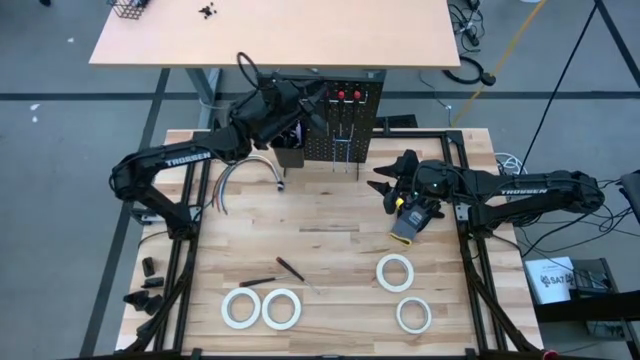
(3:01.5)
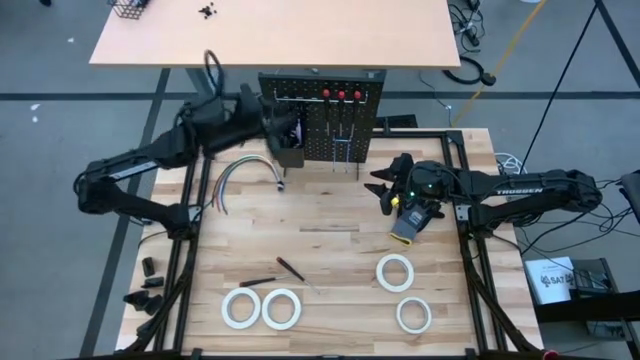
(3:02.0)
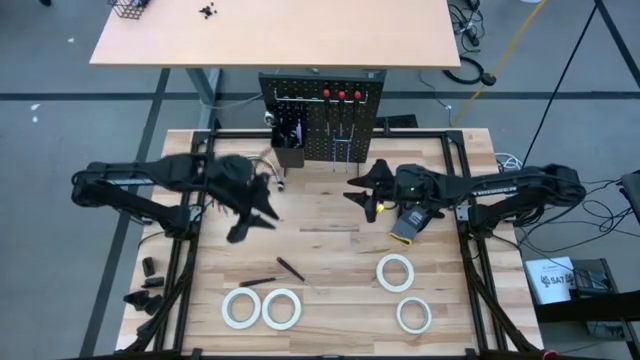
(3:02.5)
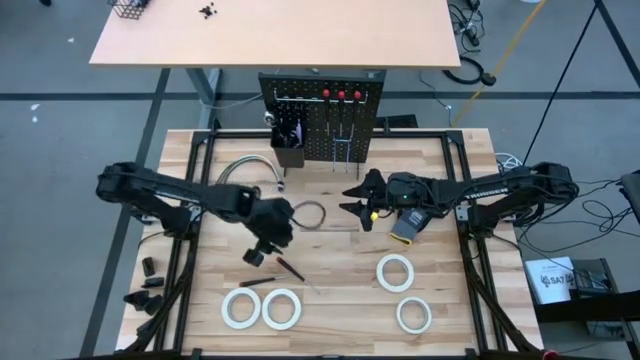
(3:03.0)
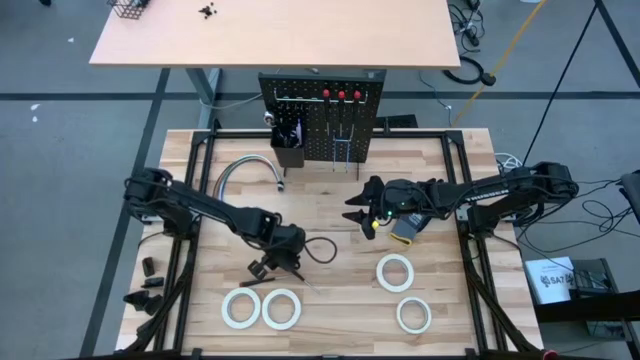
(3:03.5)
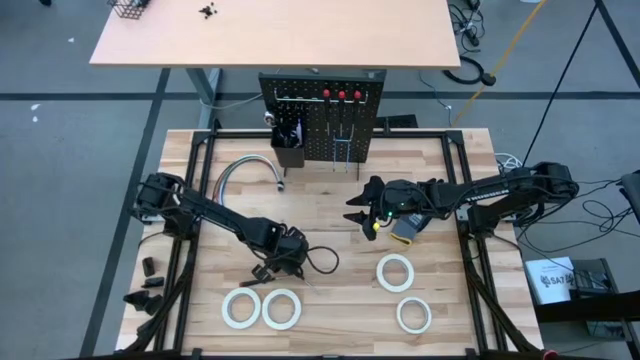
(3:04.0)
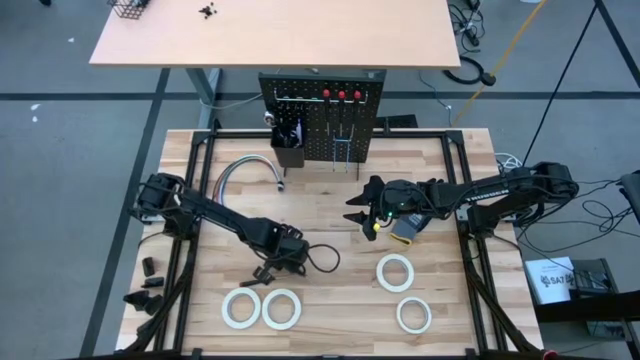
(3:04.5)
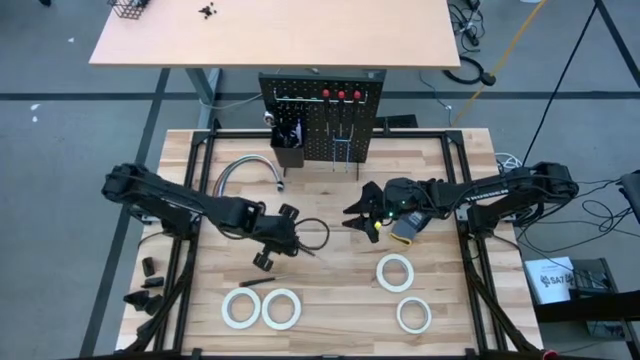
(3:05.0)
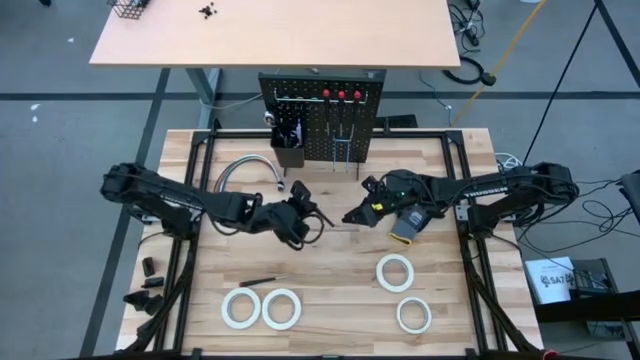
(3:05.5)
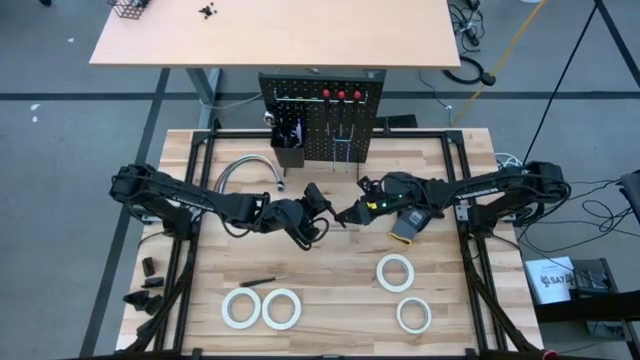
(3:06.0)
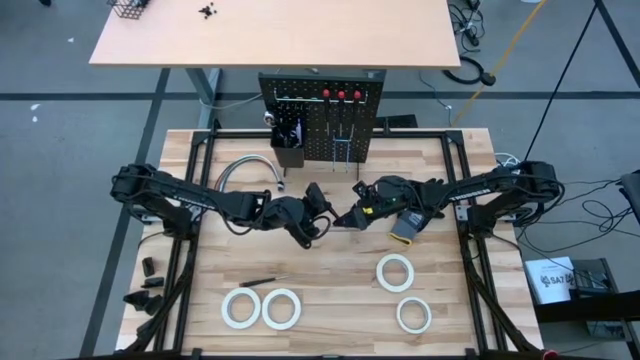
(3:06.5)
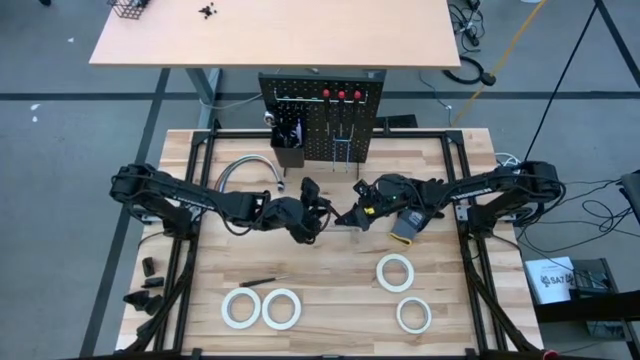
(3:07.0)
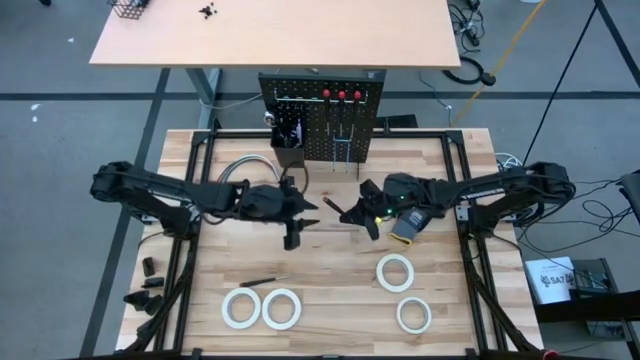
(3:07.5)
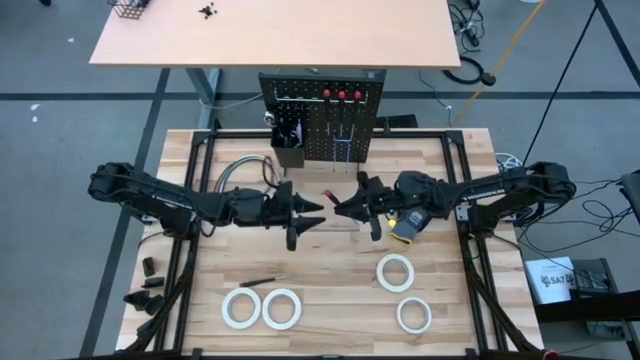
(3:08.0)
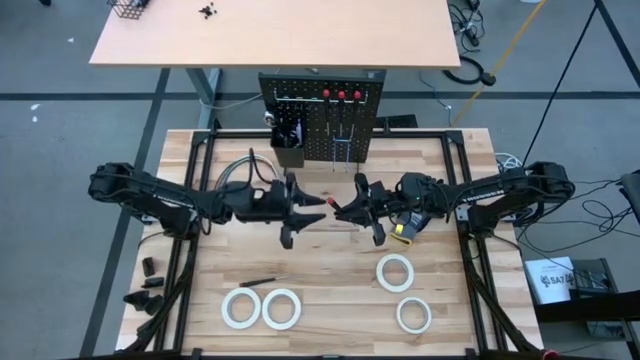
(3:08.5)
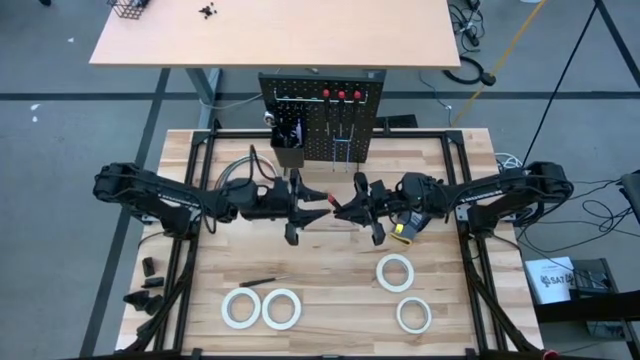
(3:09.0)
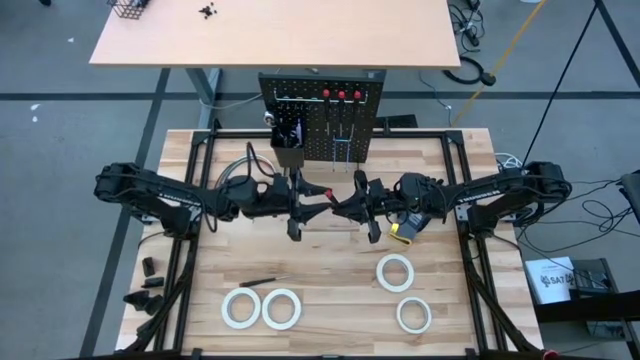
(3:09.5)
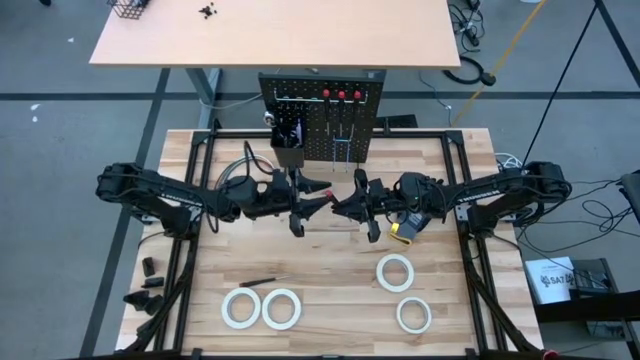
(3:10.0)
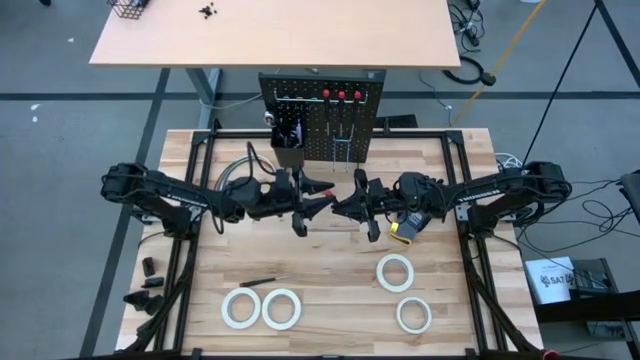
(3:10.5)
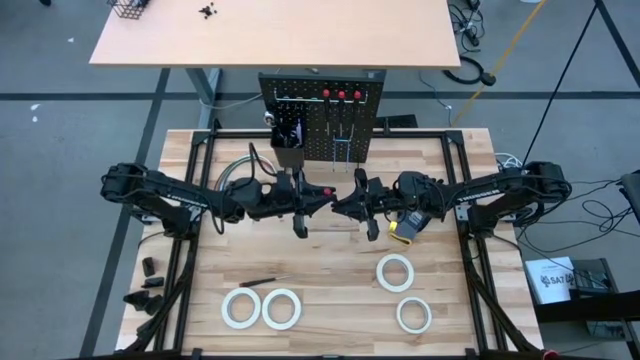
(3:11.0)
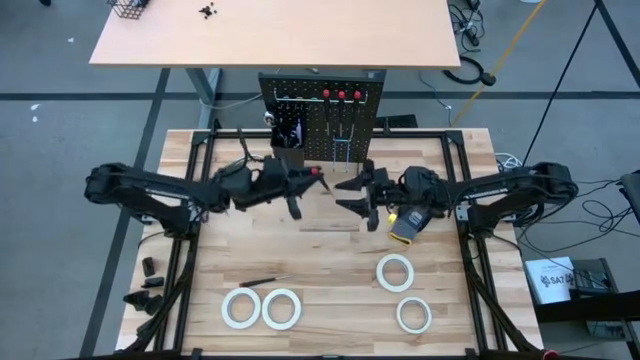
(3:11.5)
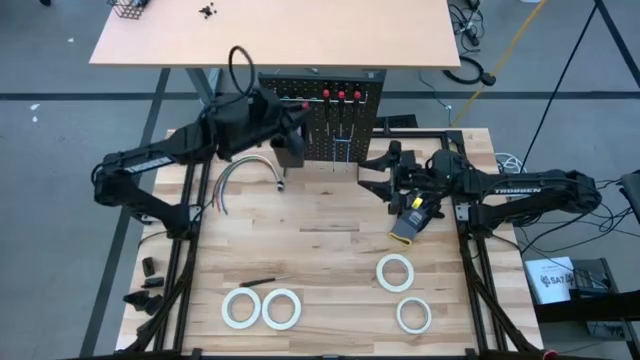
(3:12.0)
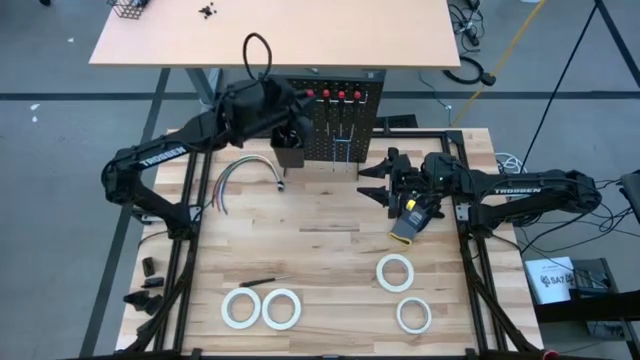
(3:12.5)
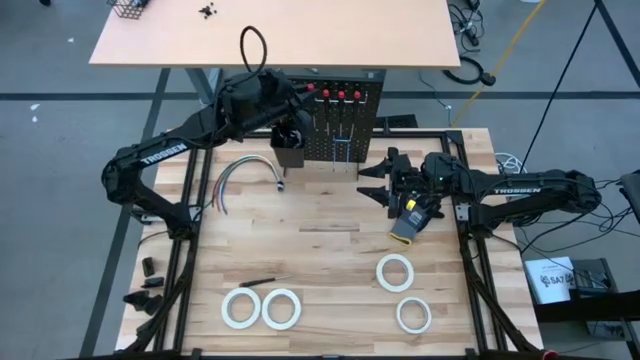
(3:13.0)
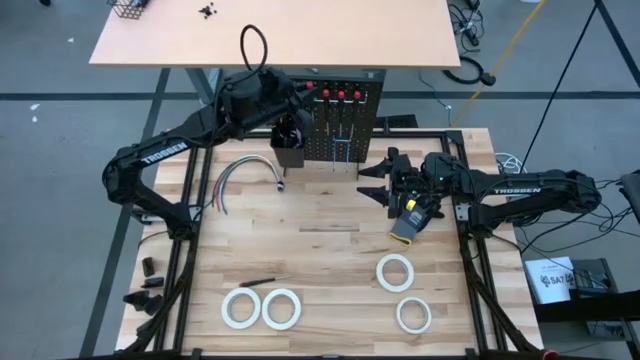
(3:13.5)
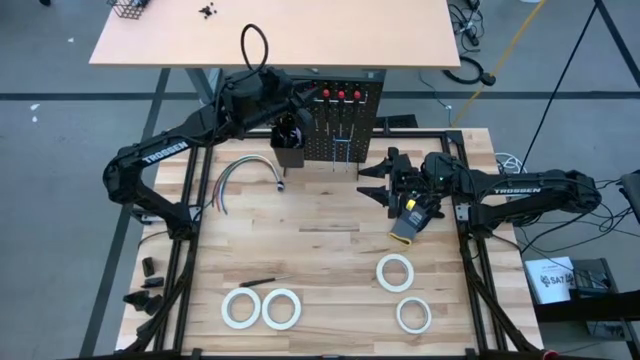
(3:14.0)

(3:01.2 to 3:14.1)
Task: Hang tools onto peg board
Hang the nut driver on the peg board

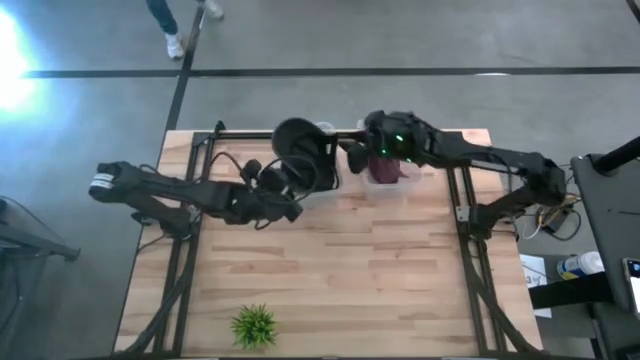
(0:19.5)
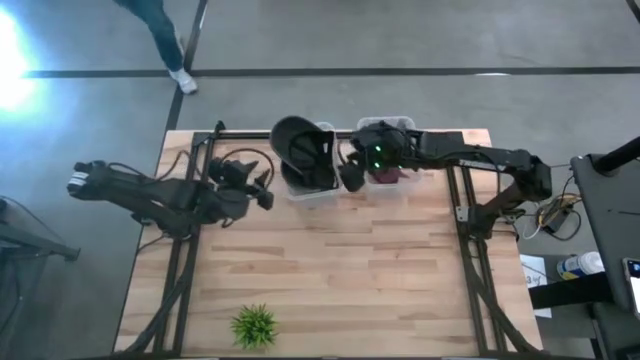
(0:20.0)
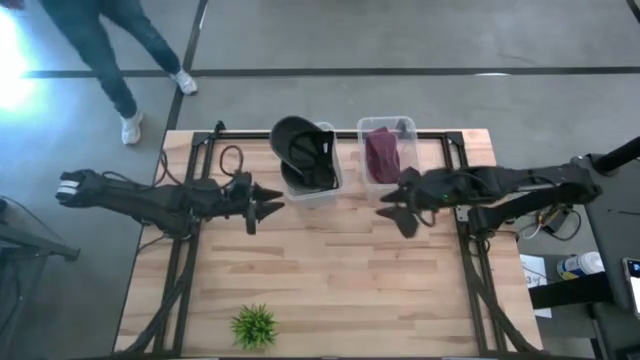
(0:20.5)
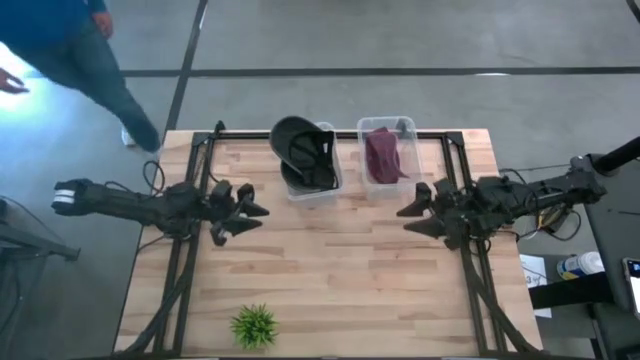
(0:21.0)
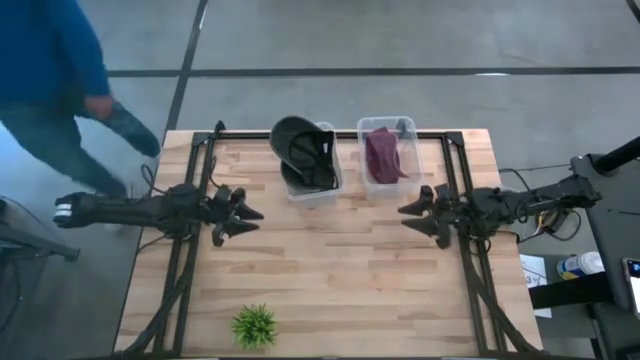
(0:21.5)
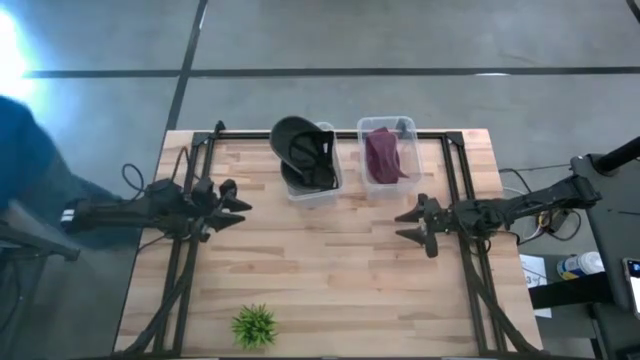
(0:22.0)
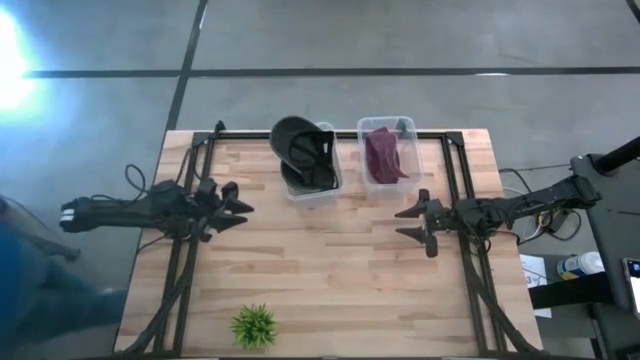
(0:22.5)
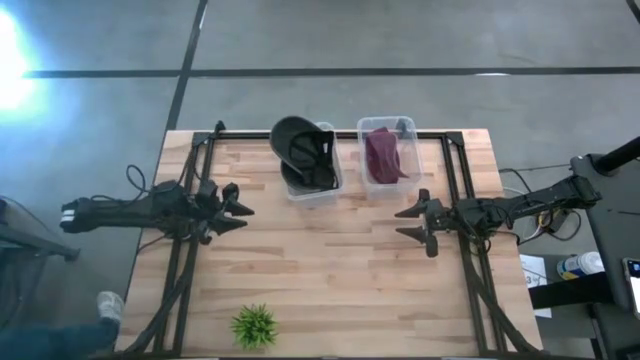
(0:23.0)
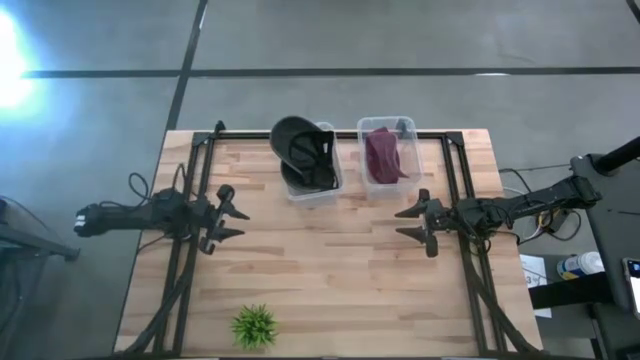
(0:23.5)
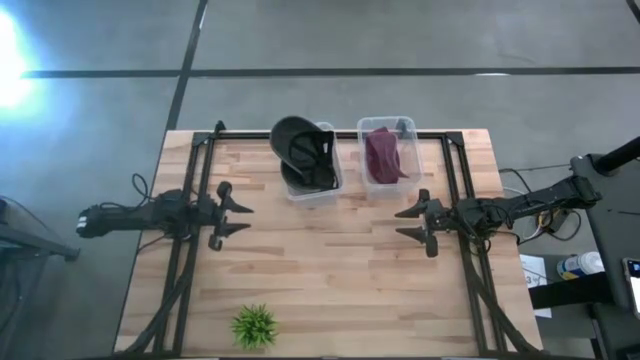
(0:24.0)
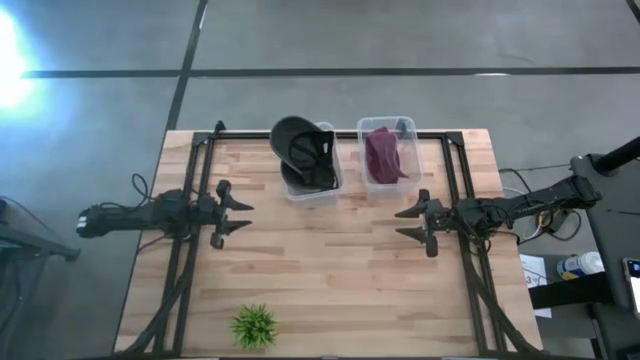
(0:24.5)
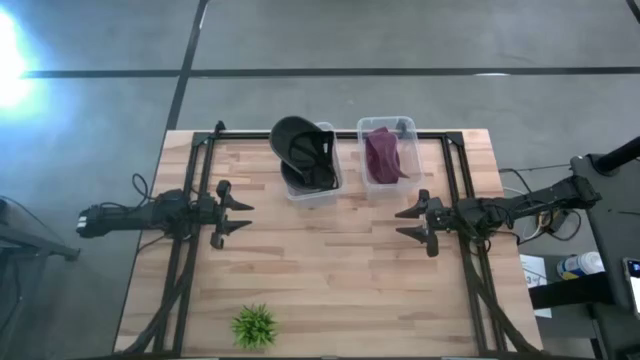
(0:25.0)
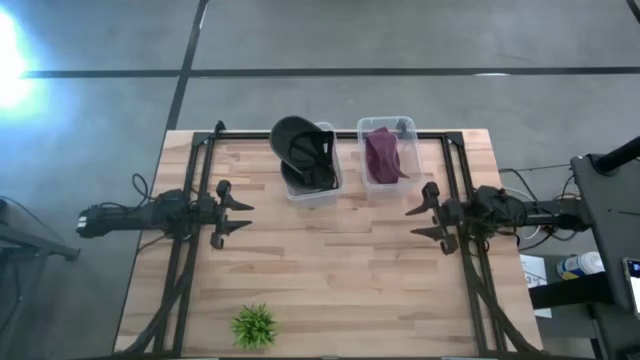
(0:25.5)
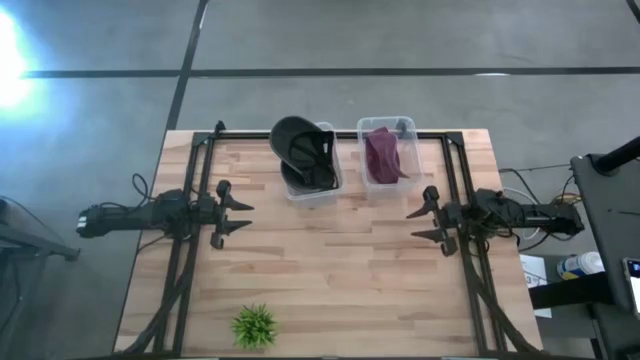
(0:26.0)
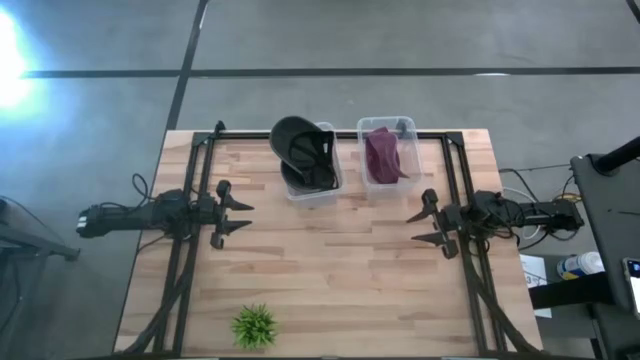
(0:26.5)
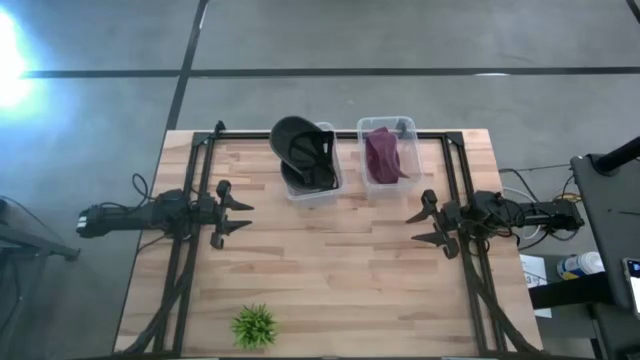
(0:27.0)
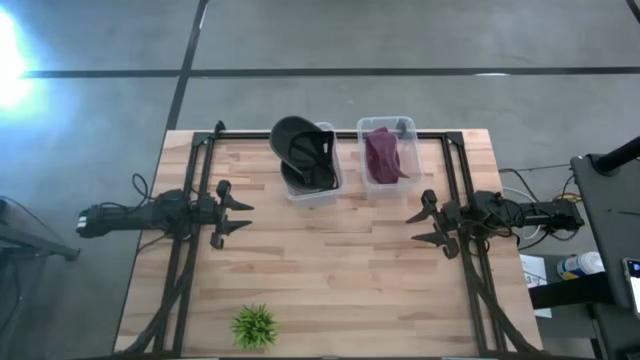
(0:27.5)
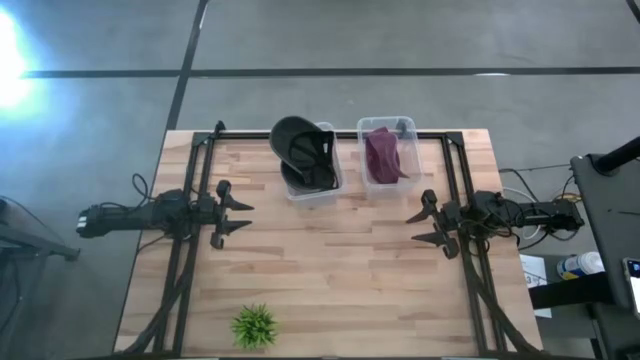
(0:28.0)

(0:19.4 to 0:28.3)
Task: Pick & Place hat
Return to Home Position
